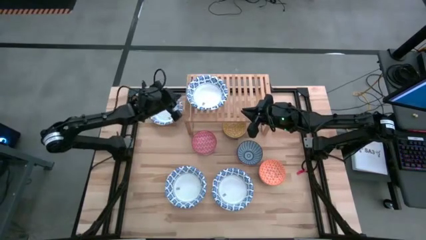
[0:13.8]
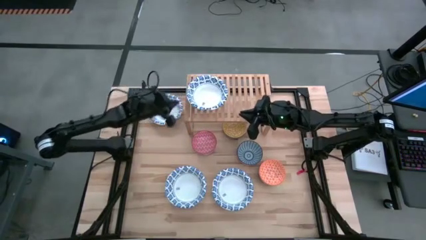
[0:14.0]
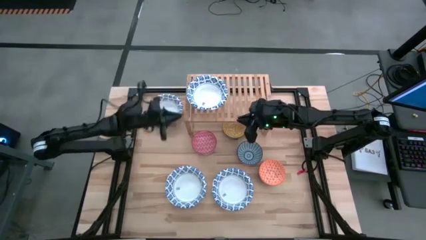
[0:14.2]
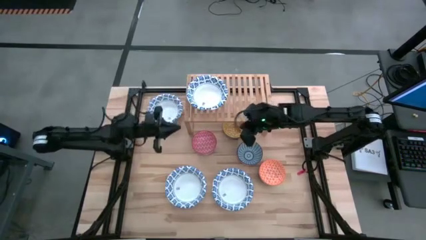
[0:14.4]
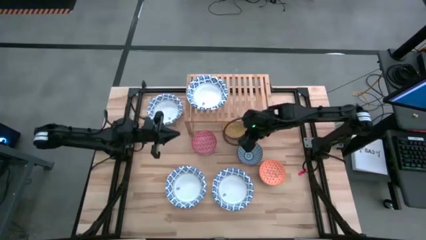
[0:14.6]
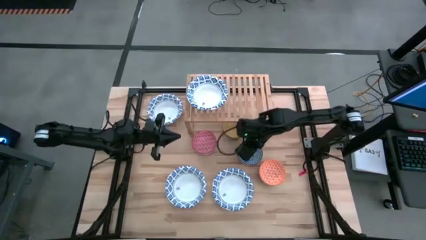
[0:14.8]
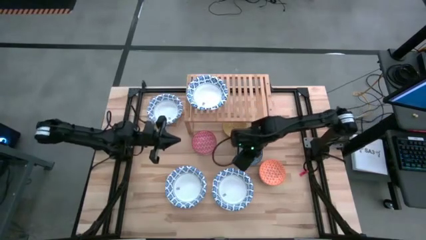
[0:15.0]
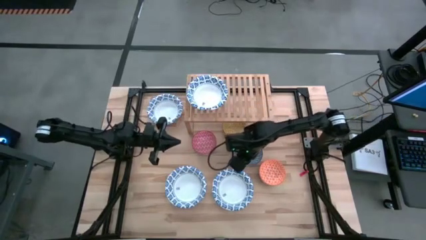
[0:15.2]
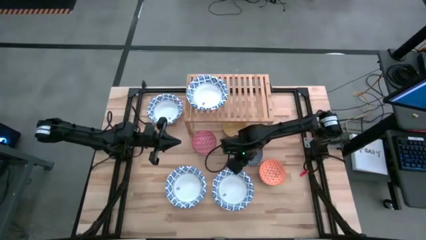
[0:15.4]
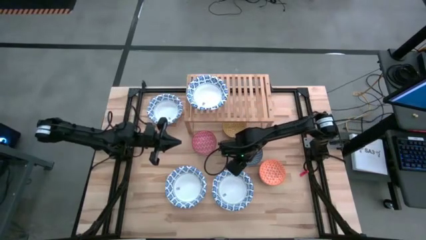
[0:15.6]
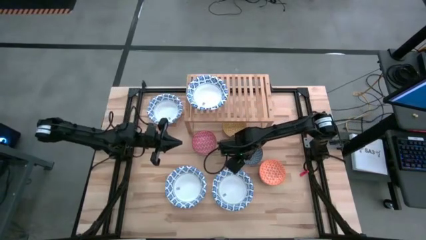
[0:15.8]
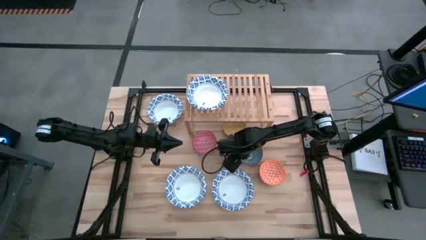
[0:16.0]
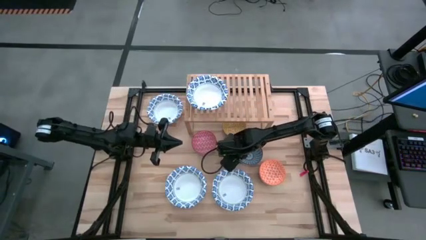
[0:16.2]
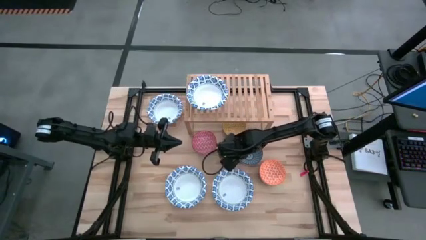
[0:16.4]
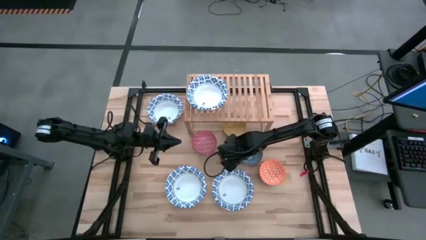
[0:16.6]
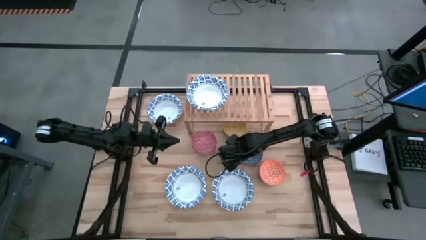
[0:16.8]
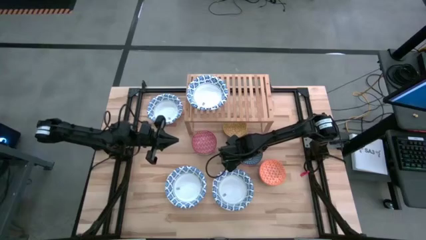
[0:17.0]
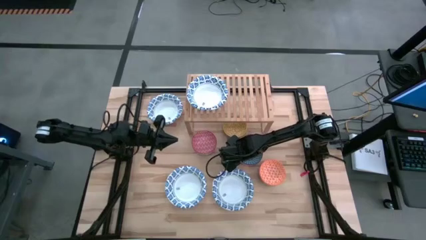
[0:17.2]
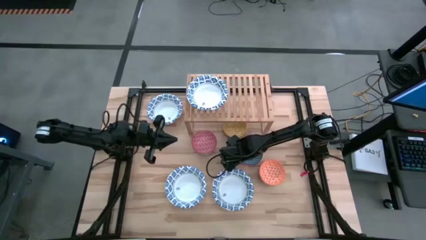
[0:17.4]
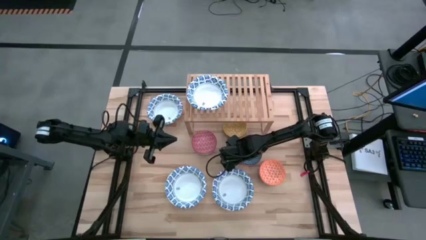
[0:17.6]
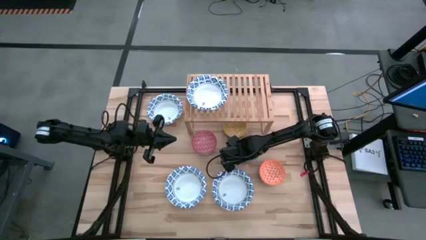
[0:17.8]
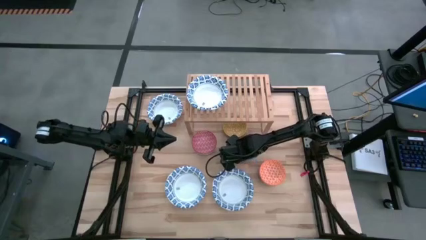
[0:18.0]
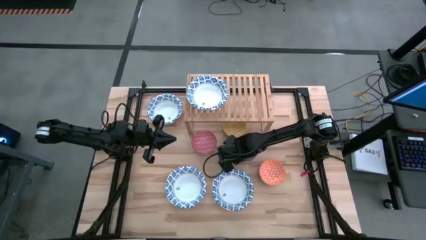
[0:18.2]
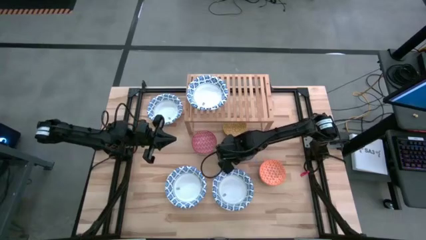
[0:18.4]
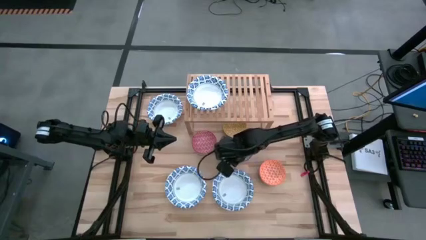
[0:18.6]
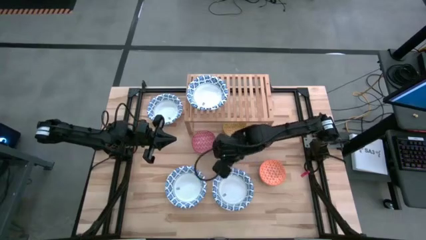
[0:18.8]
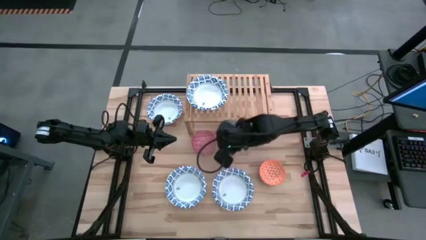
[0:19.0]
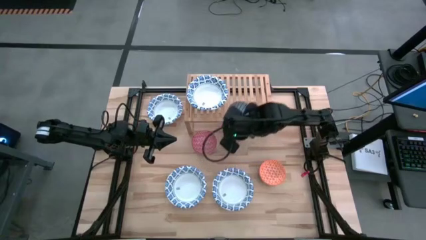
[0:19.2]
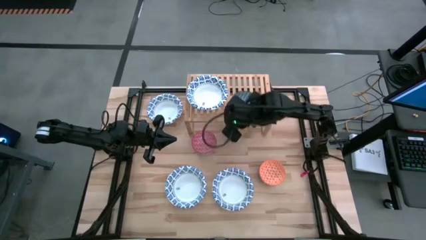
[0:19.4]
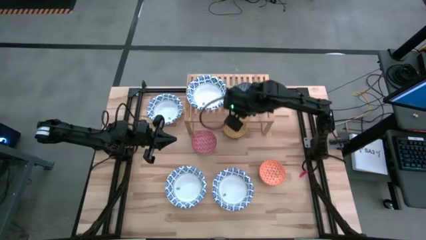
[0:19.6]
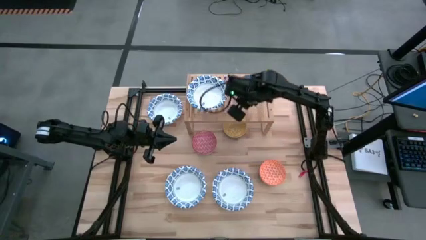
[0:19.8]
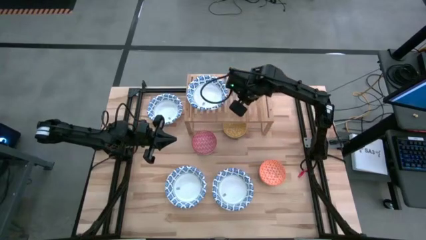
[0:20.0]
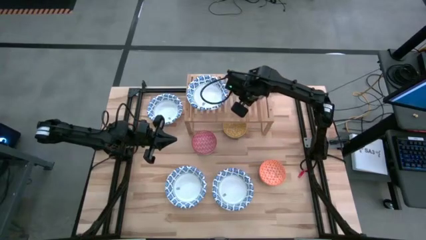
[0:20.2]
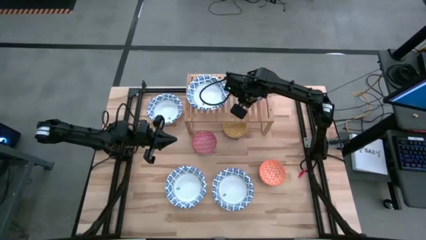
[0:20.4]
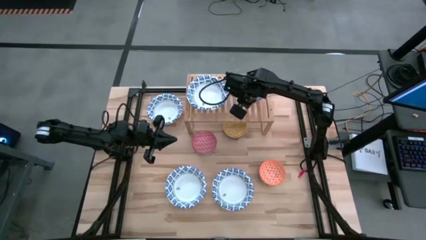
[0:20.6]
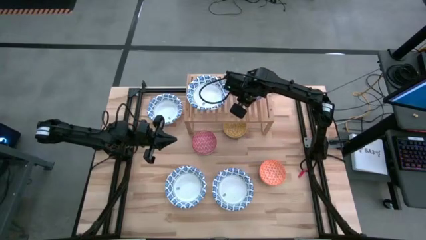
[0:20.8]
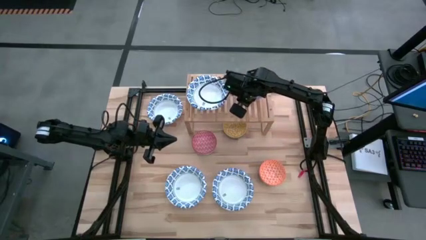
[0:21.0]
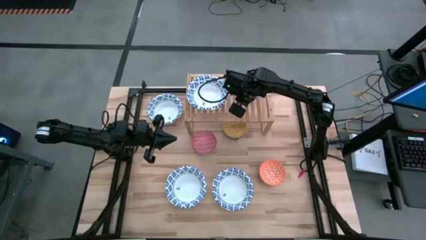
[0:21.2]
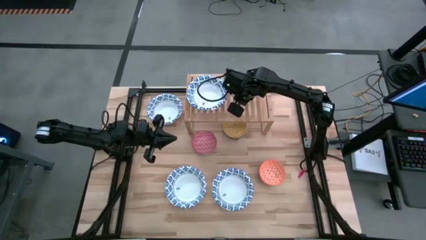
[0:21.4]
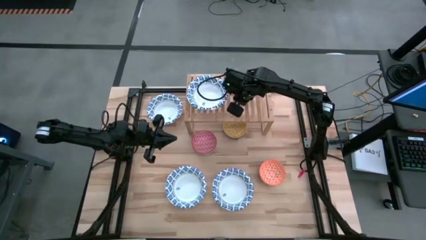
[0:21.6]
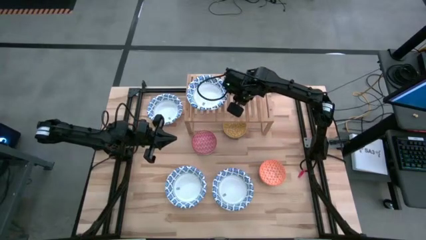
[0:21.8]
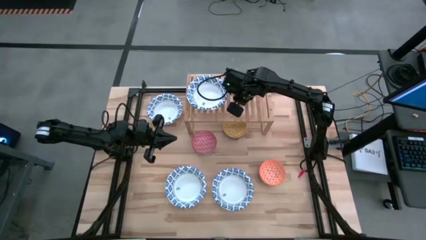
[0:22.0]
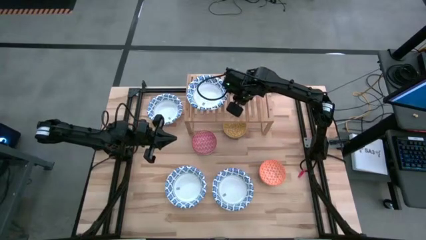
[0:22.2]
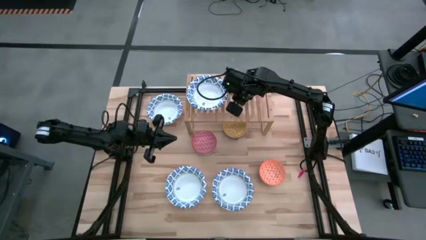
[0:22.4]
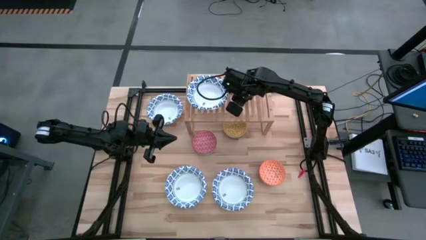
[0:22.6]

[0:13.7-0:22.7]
Task: Place and stack bowls onto a shelf
Put the blue bowl on the shelf

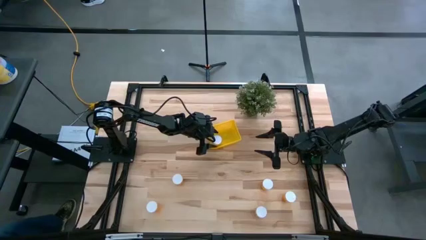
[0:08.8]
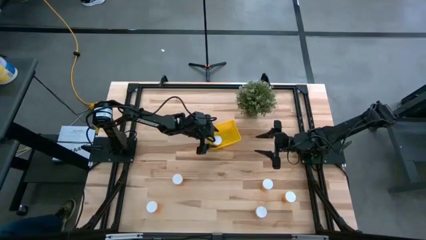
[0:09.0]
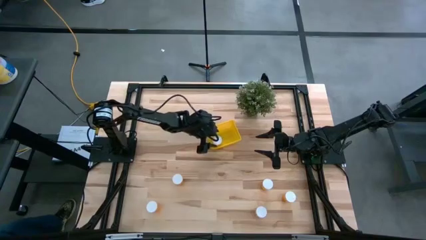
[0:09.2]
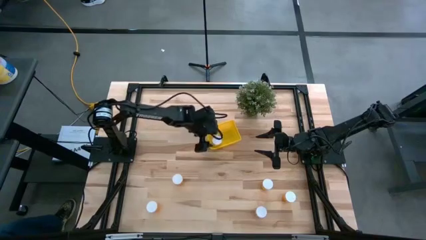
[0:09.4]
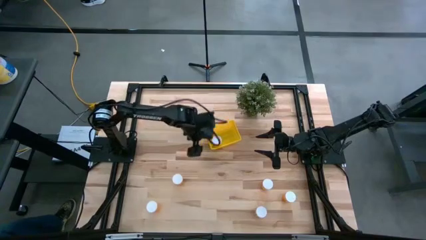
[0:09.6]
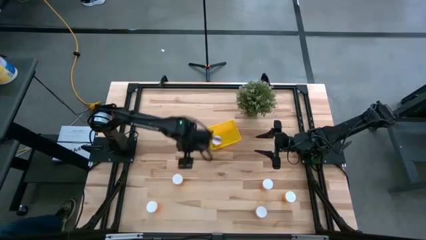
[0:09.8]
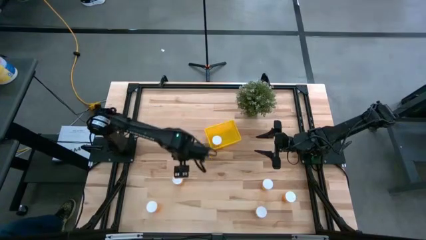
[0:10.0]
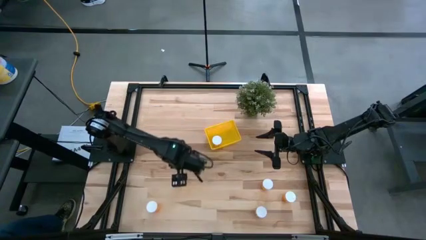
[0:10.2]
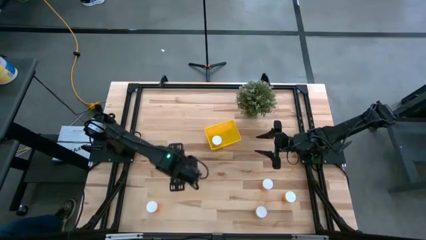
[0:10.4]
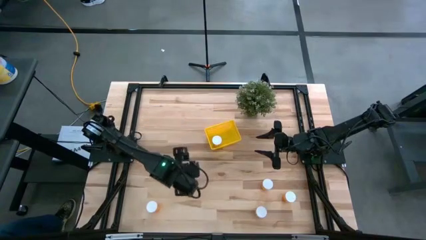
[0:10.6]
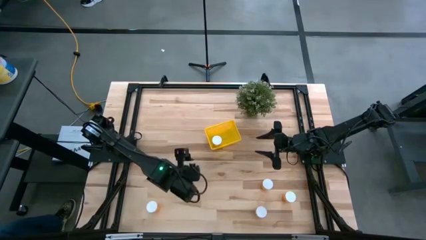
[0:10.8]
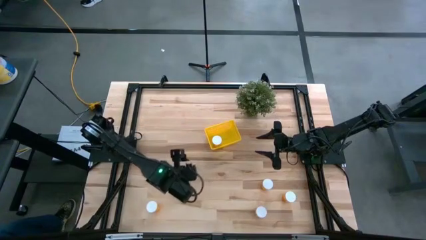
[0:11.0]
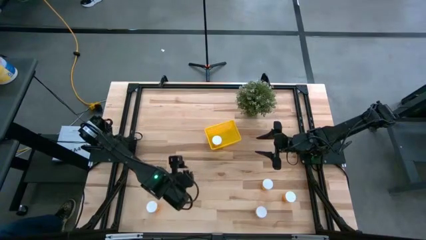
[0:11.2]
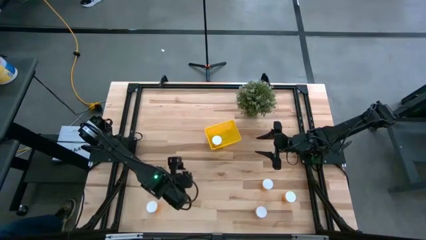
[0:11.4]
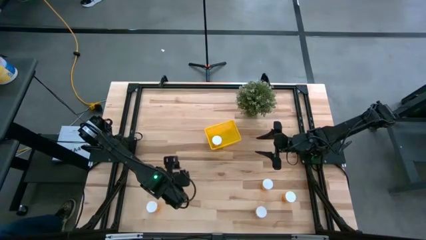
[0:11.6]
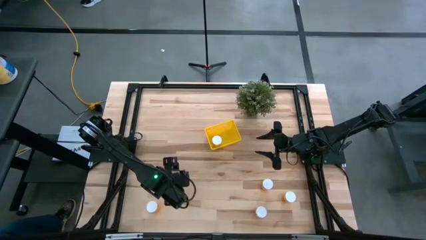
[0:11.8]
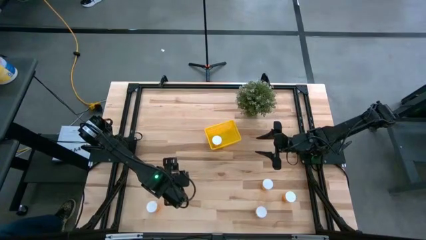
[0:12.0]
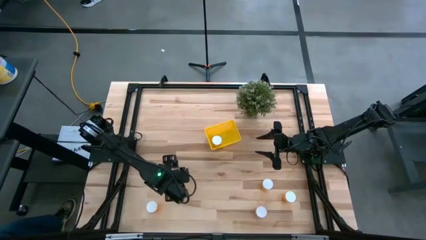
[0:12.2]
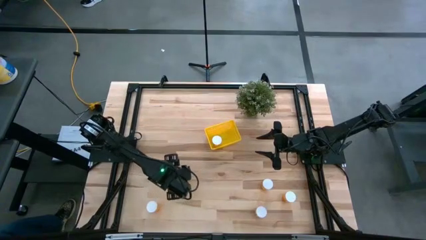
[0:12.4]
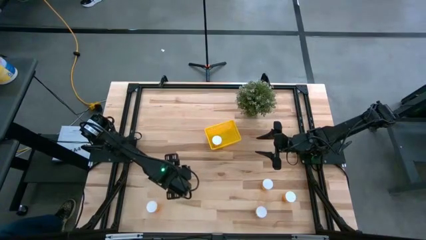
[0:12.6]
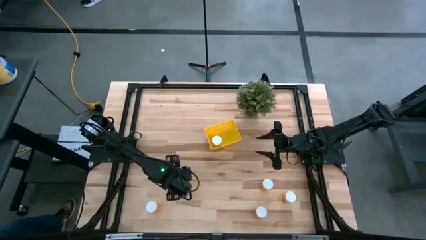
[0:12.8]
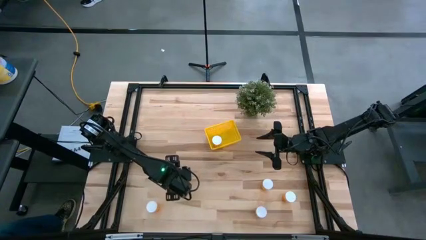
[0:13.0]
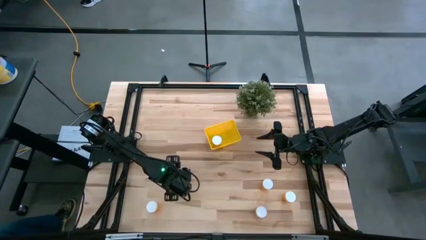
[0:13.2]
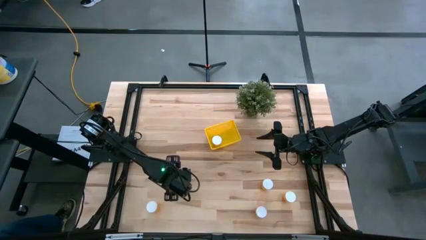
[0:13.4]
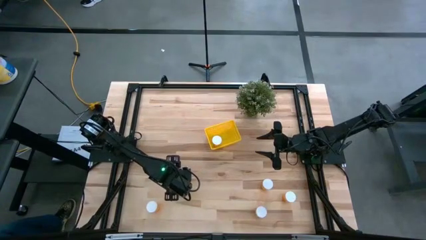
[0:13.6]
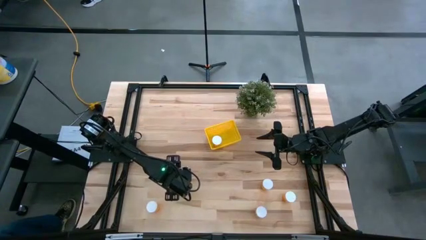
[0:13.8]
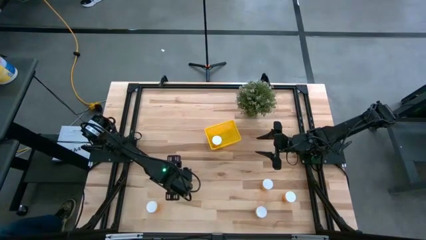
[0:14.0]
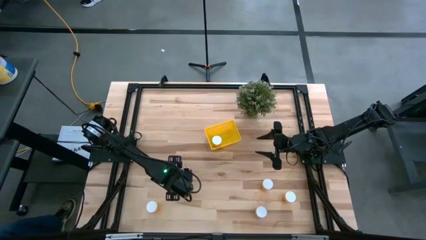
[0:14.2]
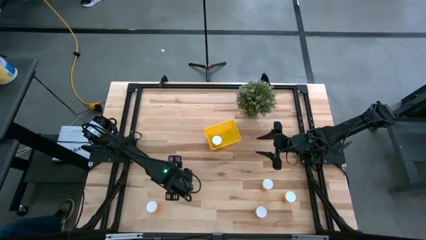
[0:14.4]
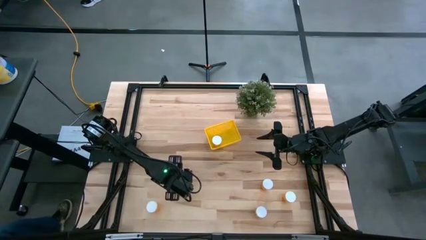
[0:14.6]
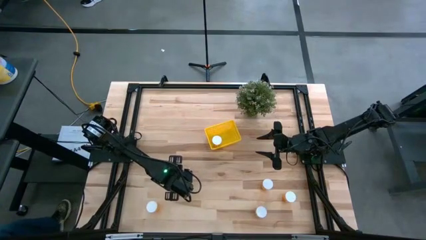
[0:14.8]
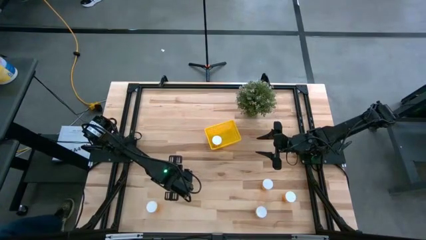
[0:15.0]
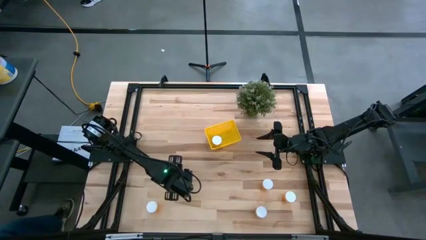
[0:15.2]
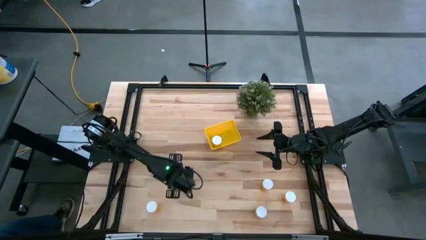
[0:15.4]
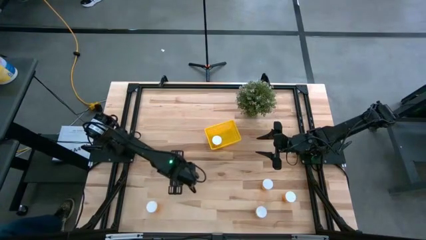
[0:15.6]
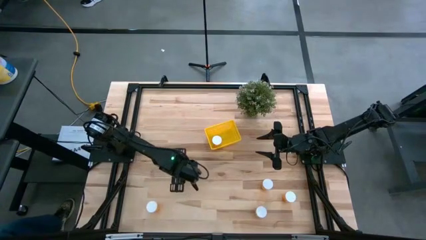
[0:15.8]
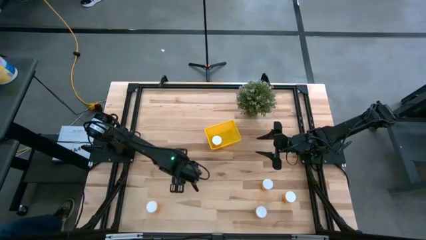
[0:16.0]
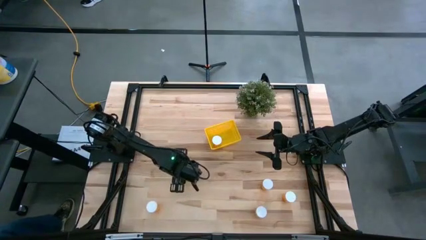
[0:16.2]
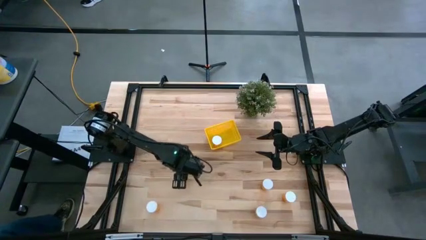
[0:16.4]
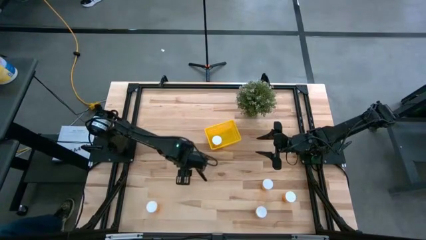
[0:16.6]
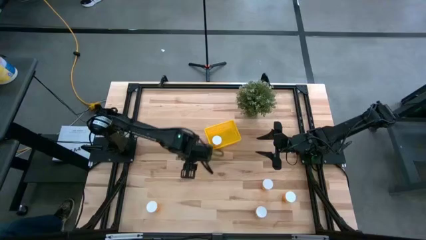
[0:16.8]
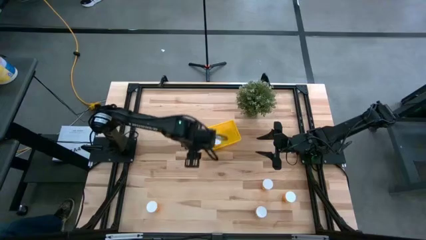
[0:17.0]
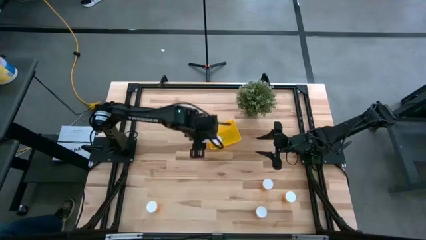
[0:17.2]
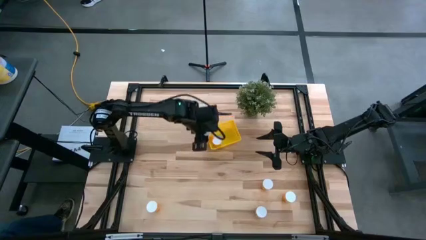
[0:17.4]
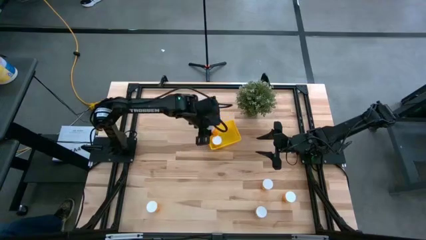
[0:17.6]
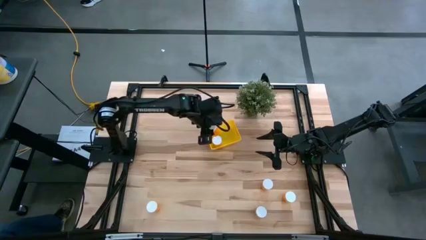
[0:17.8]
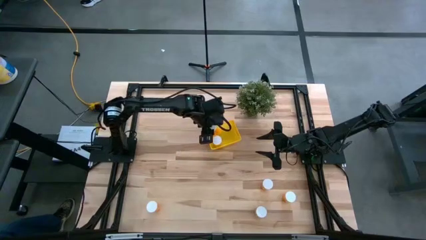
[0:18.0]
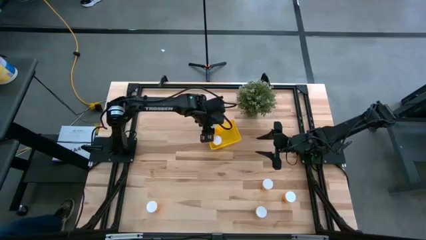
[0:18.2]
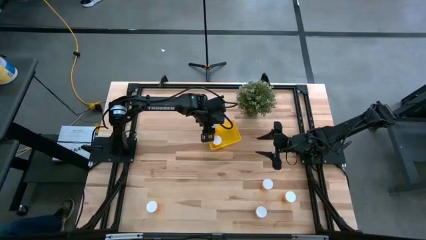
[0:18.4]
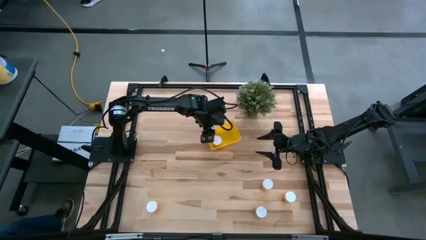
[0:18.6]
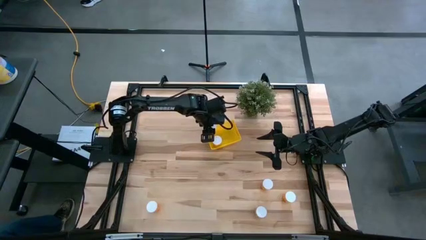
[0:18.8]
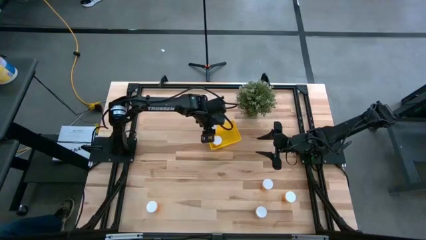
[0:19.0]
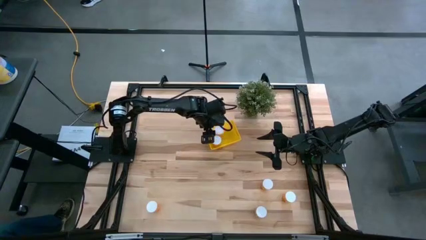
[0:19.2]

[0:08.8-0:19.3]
Task: Pick and place pill bottles into a basket
Put the orange pill bottle into the yellow bin
